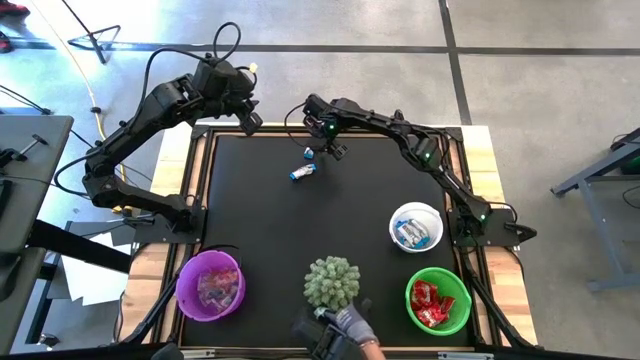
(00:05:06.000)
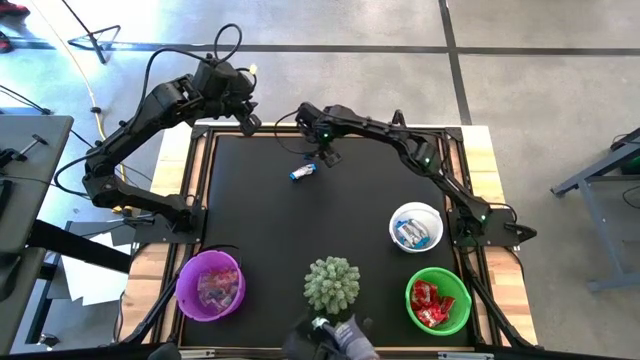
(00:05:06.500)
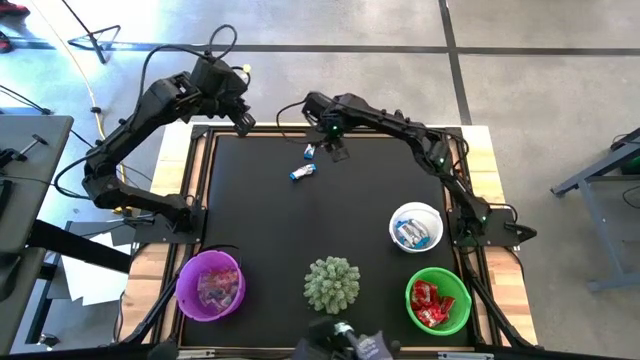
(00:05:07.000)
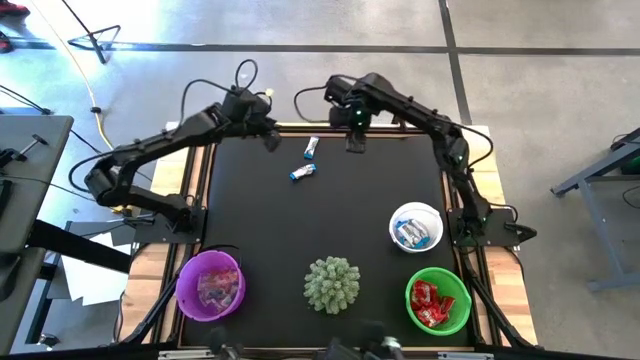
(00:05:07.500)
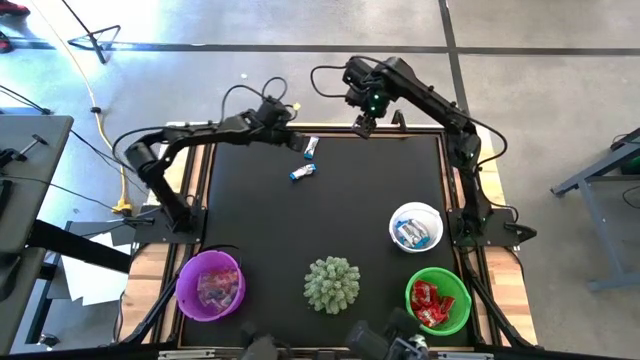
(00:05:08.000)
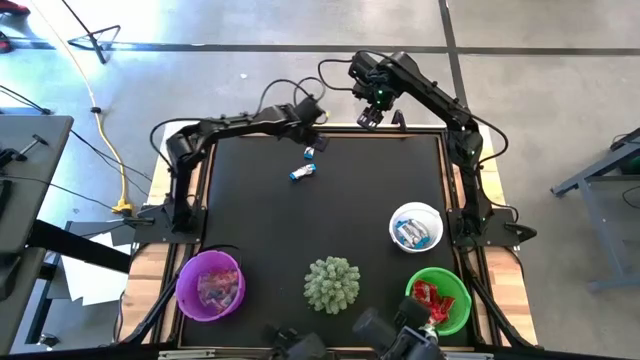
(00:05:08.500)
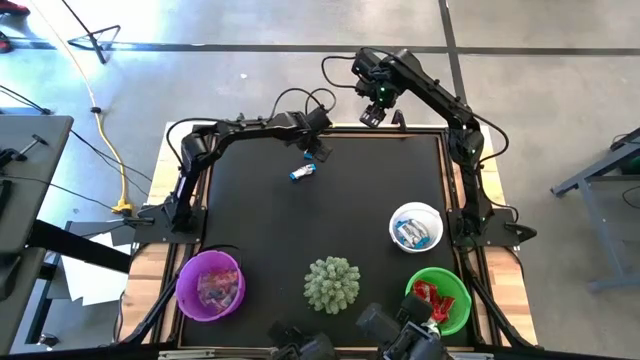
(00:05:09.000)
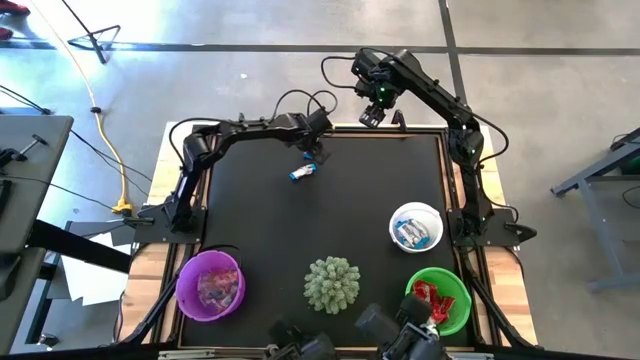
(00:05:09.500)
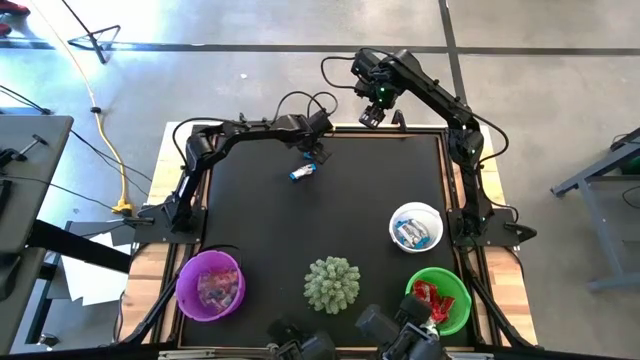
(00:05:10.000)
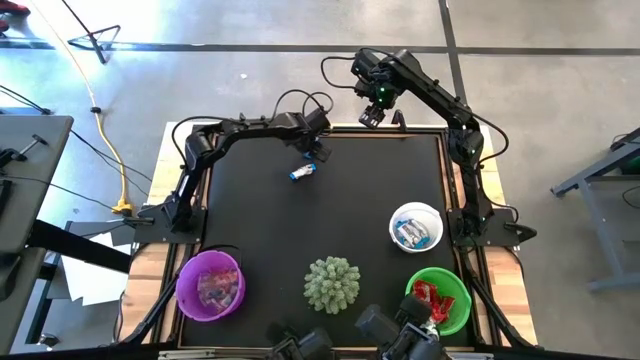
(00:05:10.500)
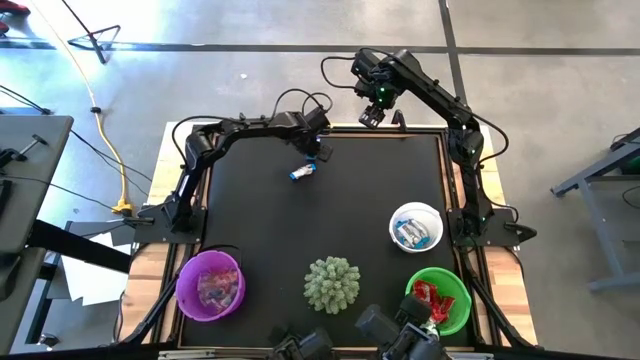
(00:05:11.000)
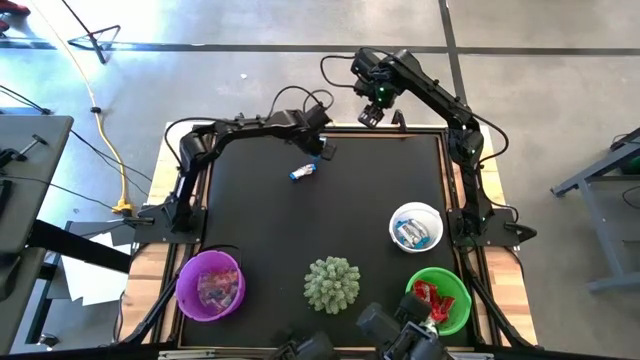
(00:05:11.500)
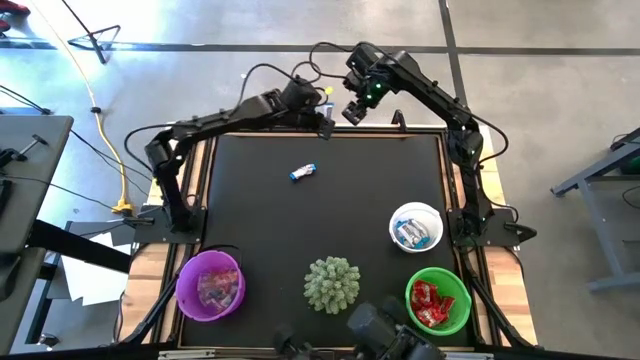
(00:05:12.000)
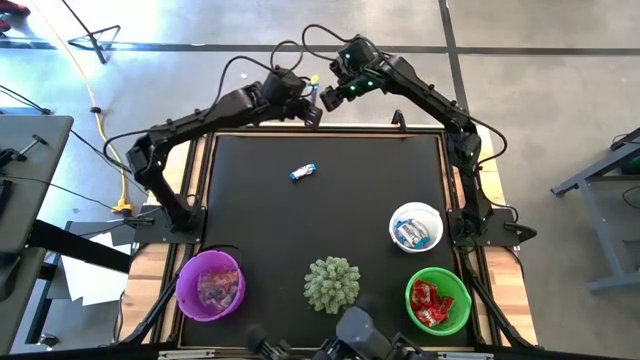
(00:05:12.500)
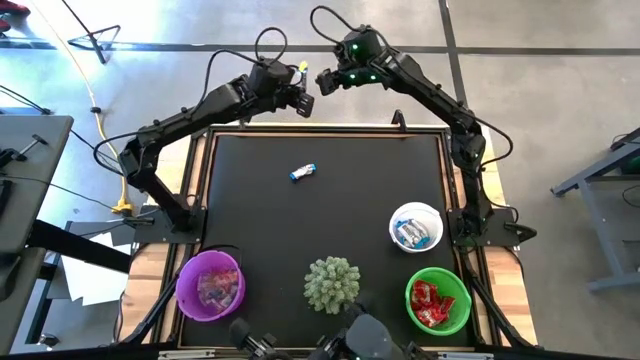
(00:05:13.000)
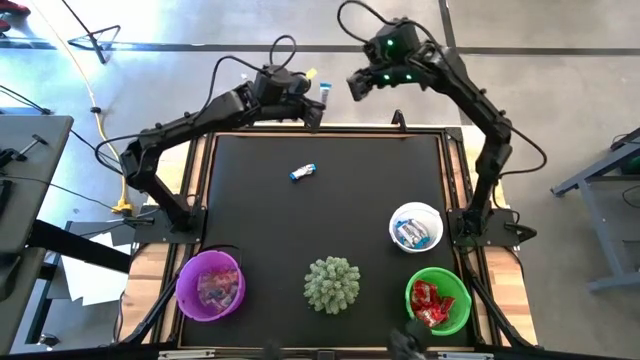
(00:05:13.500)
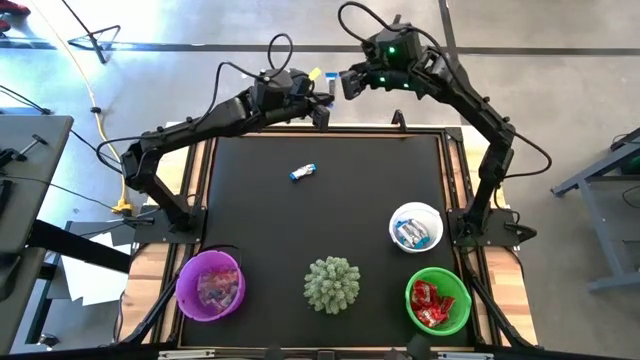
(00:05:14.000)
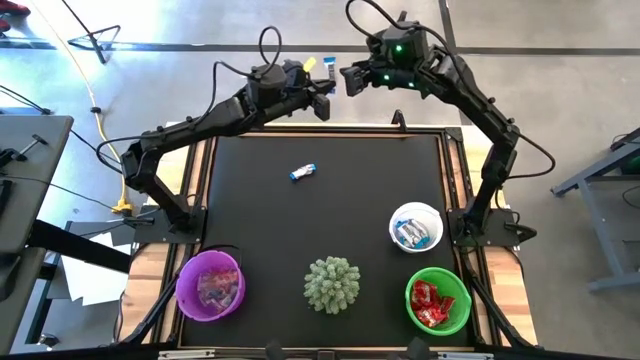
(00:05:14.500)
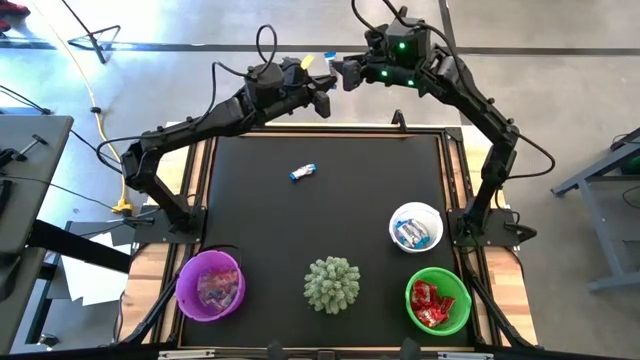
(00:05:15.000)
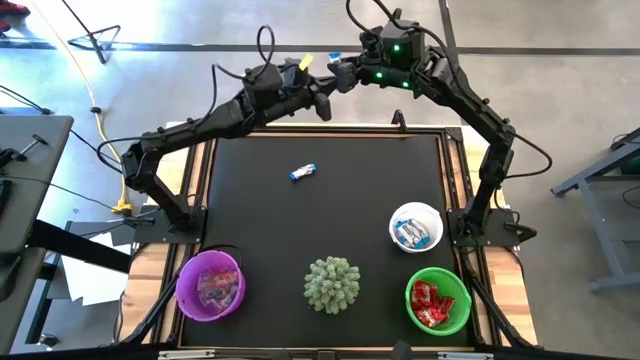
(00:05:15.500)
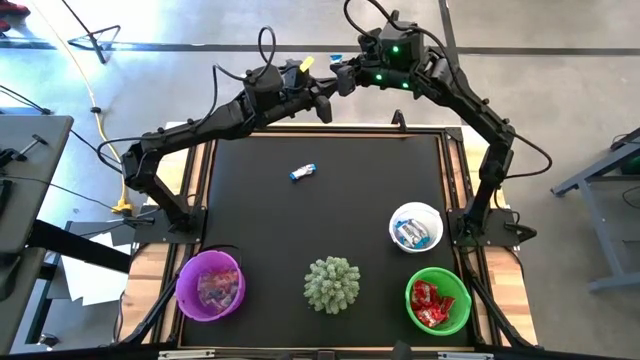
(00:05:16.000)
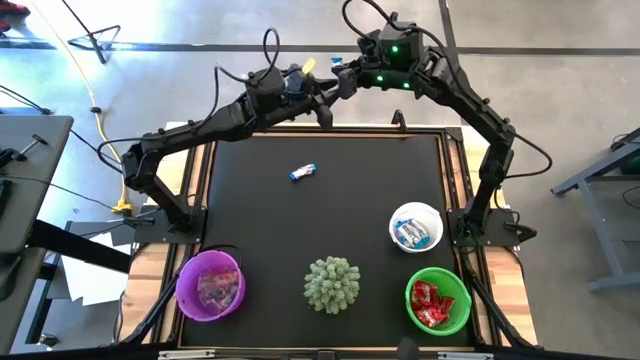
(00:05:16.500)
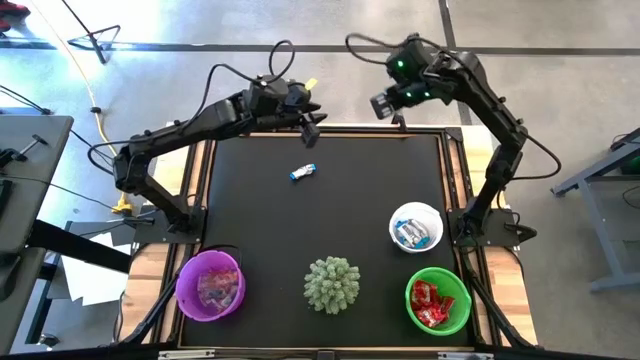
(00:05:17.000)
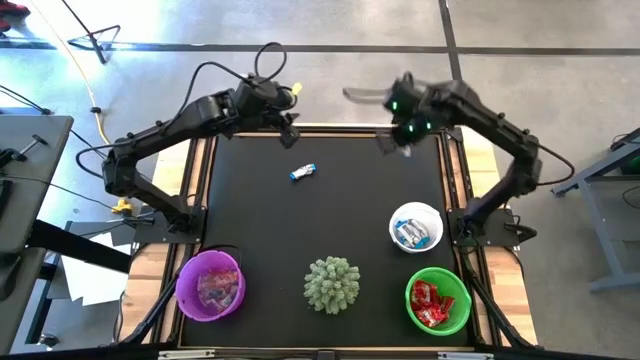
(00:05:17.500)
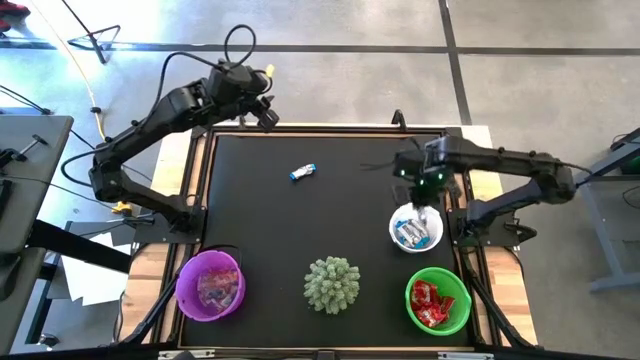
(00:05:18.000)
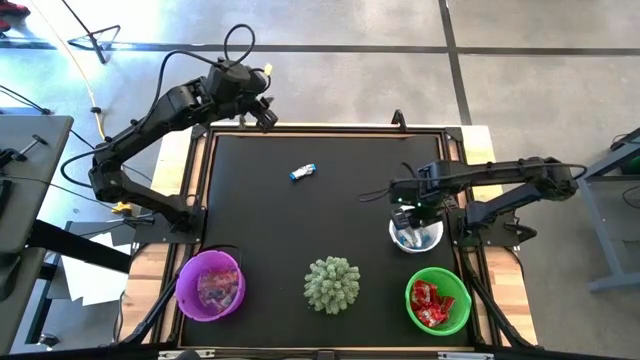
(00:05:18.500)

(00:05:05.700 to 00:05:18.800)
Task: Sort candy
Put the white candy wrapper into the white bucket

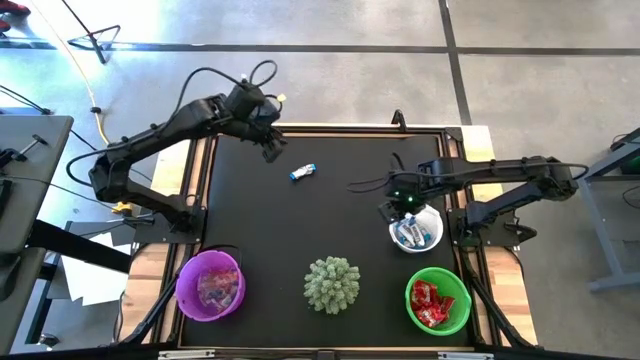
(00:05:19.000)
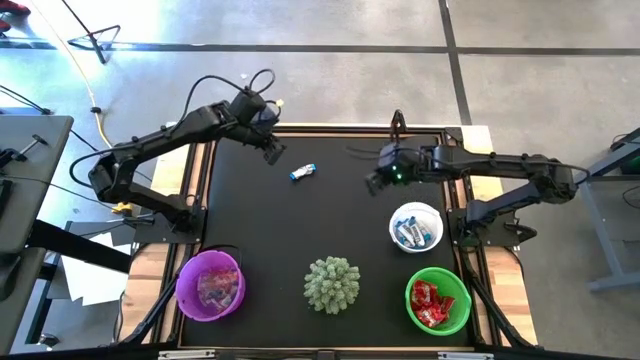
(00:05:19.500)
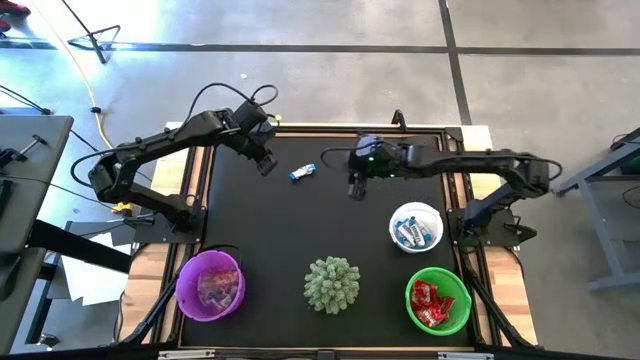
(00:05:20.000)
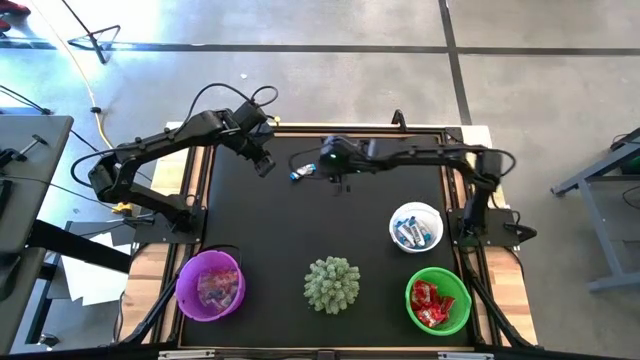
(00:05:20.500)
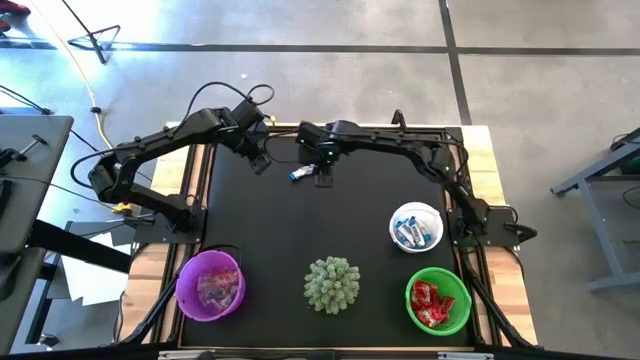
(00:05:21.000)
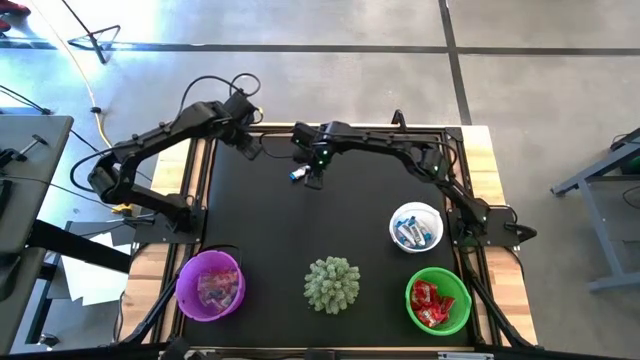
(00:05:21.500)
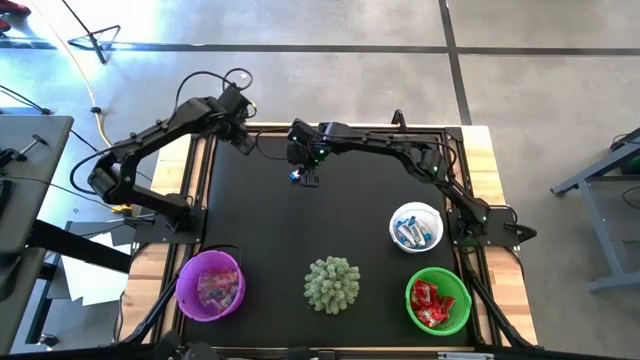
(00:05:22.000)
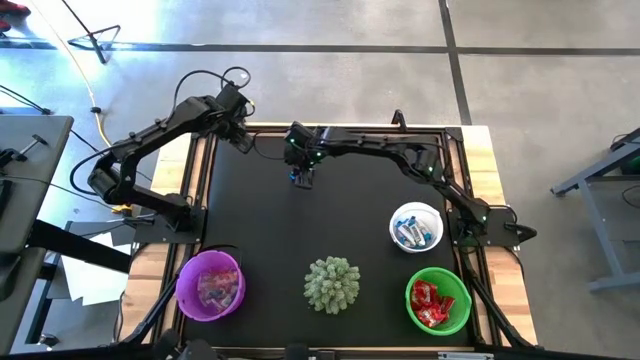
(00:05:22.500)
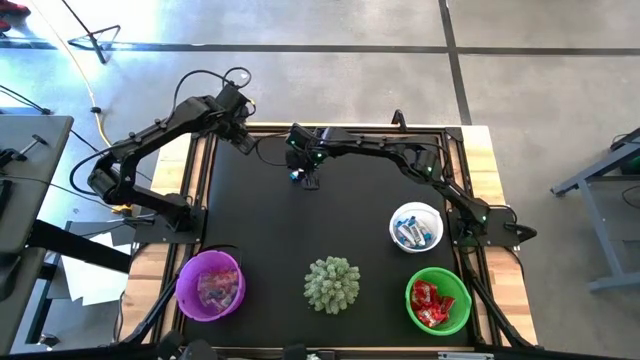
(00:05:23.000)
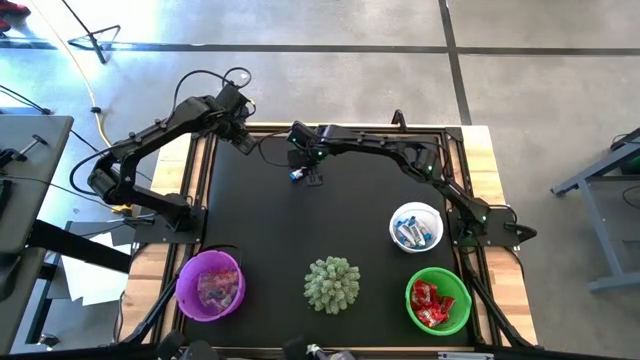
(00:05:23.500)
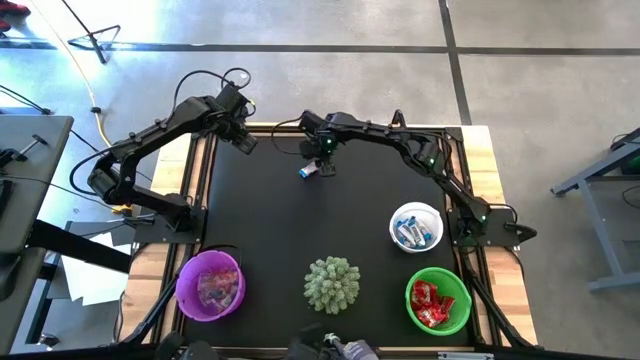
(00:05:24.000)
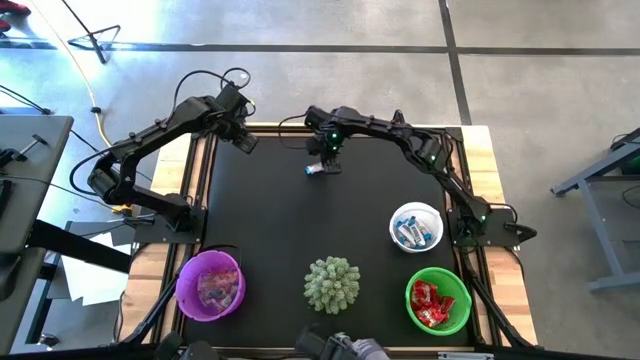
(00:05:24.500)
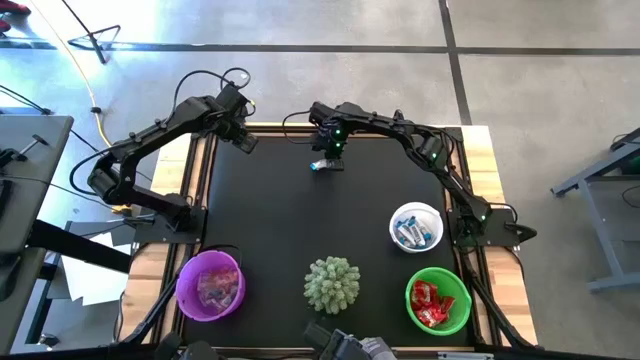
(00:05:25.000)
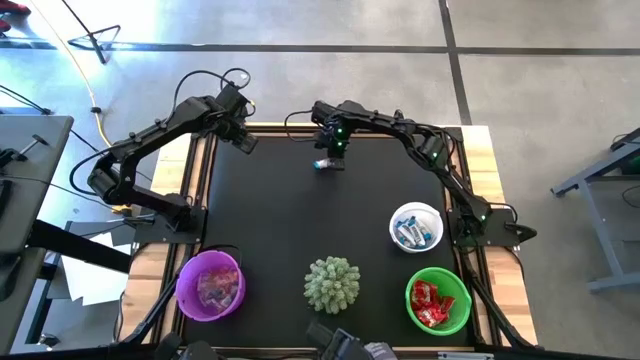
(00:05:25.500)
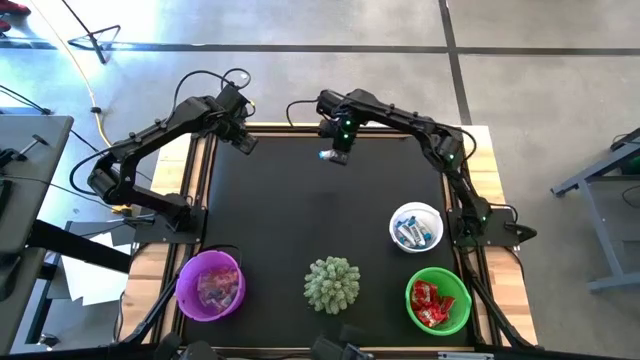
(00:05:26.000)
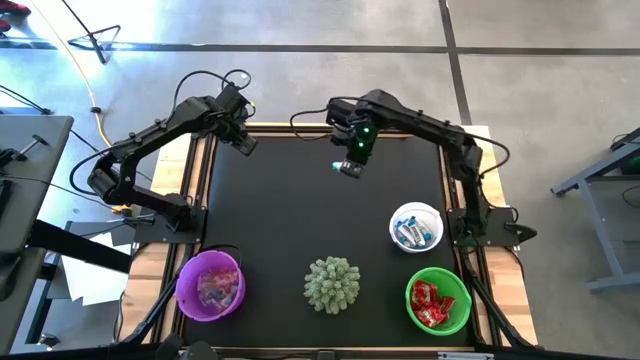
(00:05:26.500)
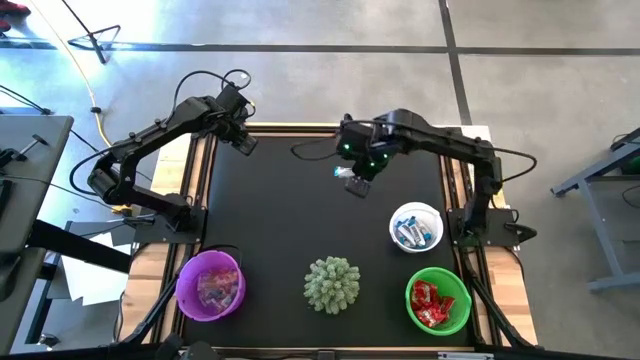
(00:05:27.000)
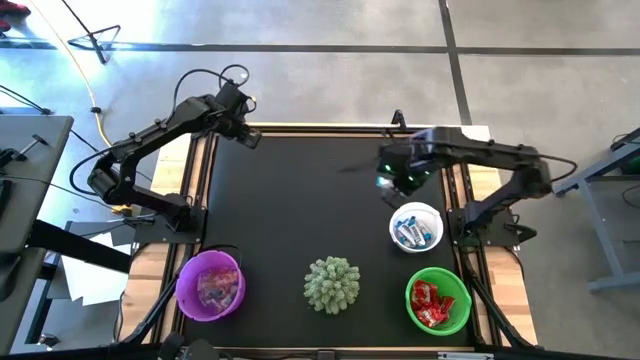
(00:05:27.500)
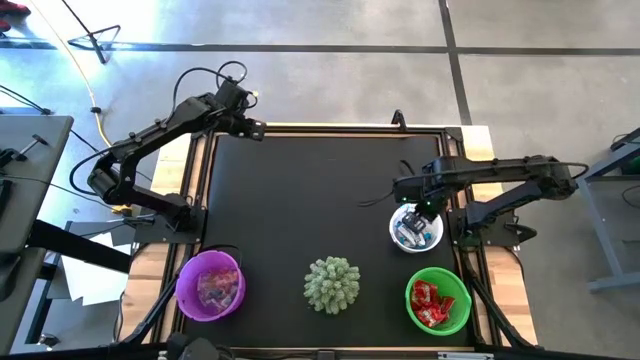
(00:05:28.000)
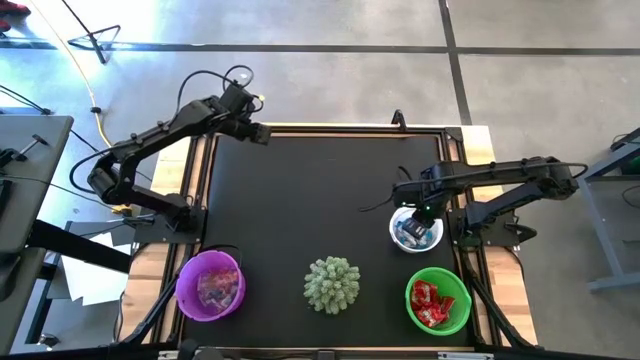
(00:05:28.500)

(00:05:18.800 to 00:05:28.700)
Put the white candy wrapper into the white bucket
